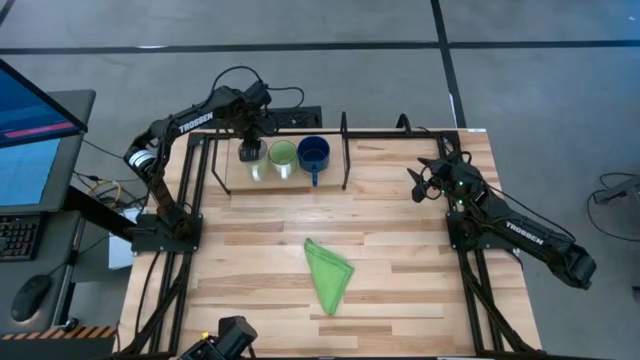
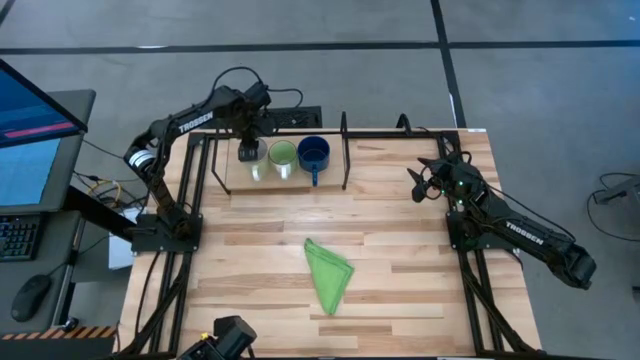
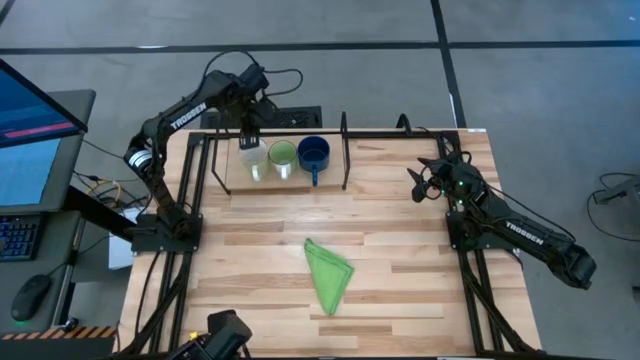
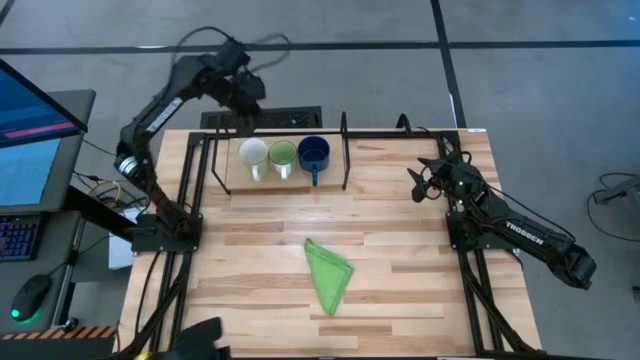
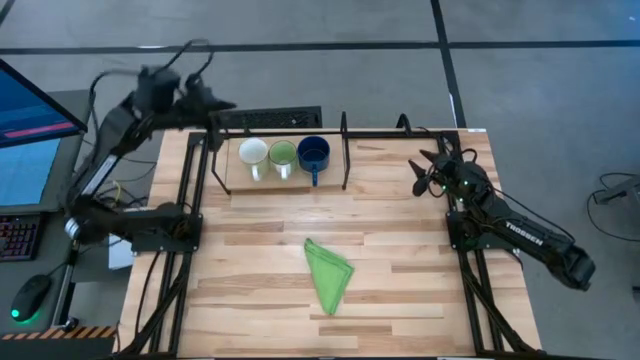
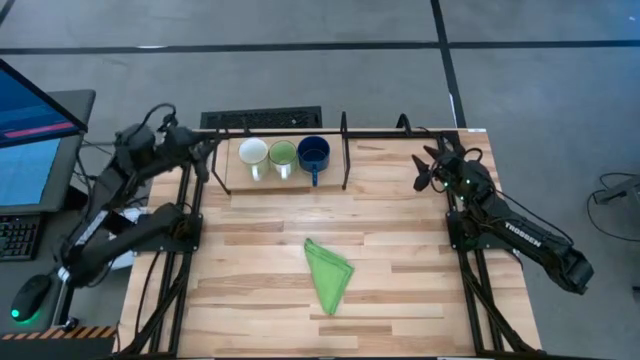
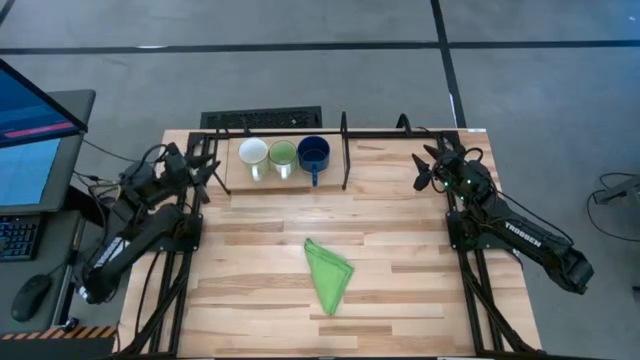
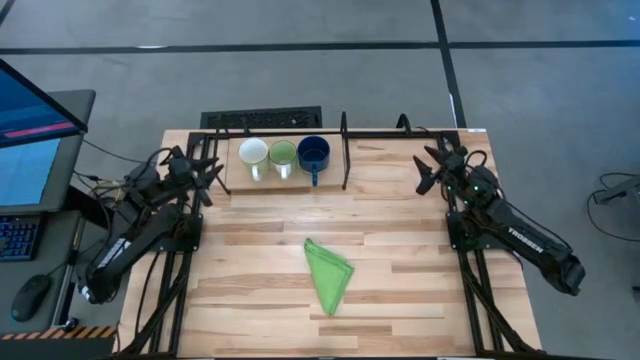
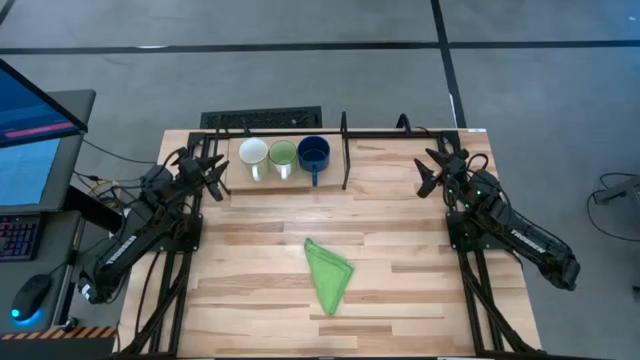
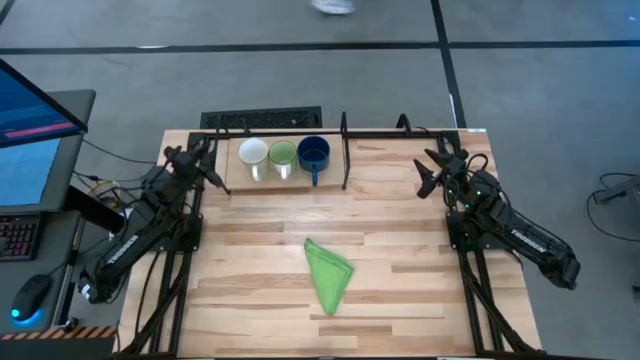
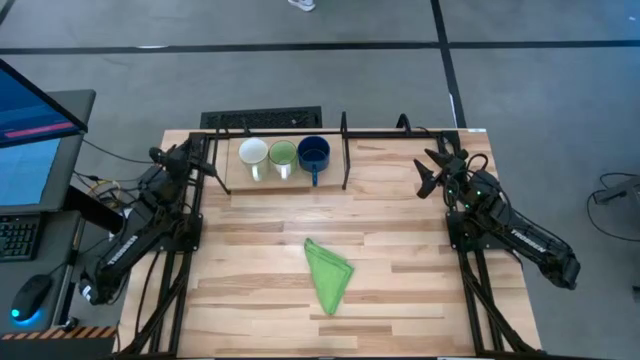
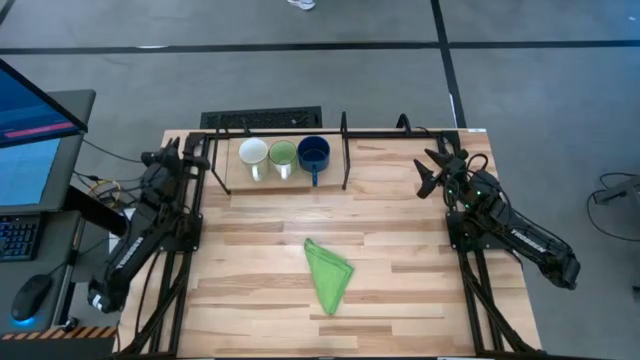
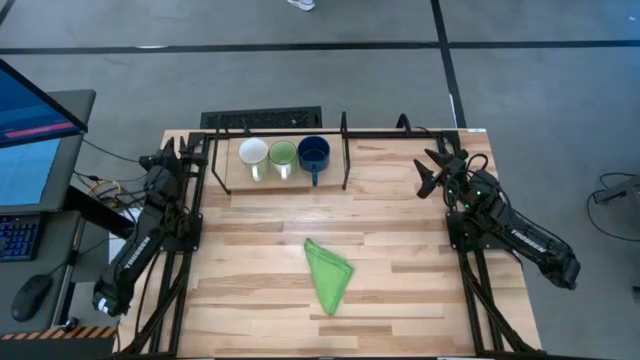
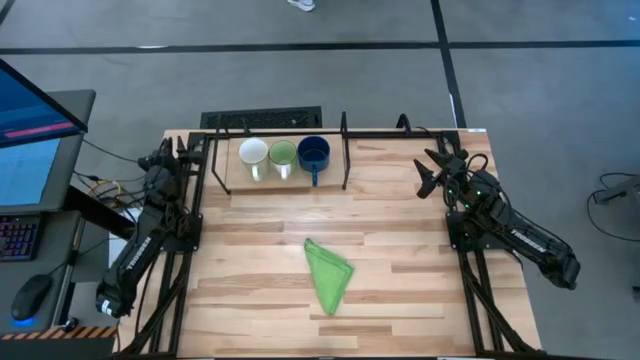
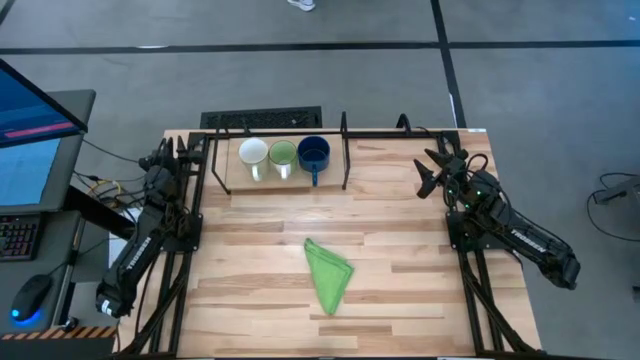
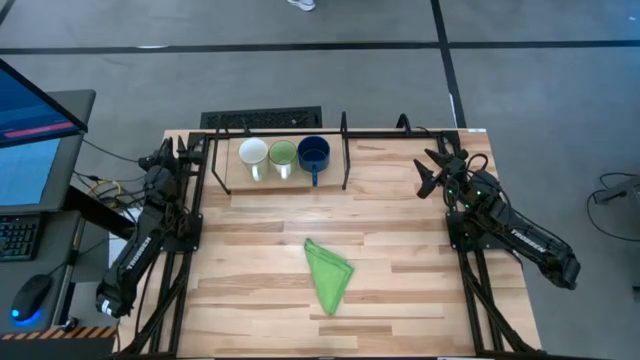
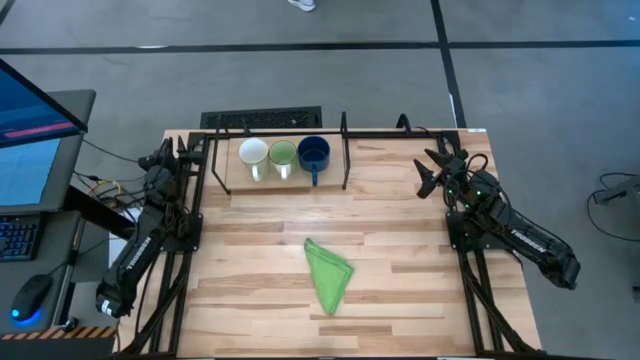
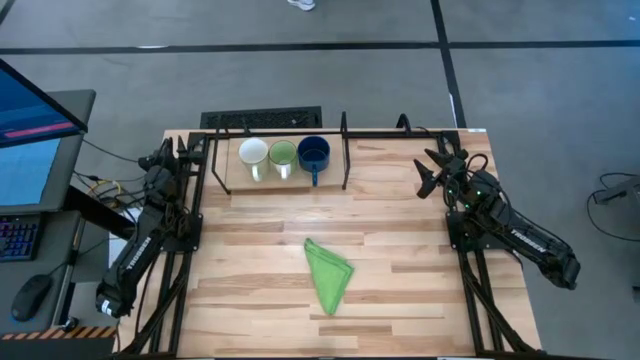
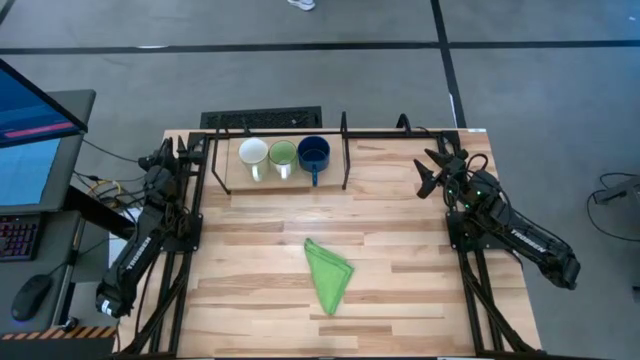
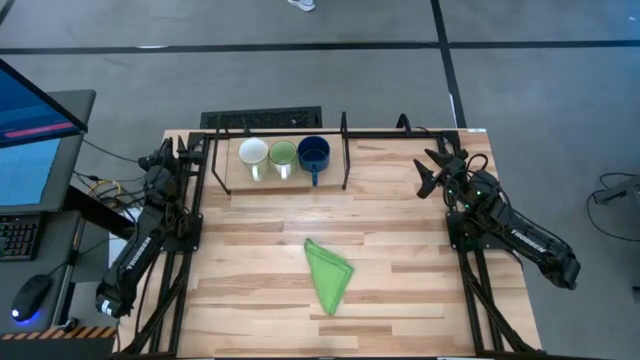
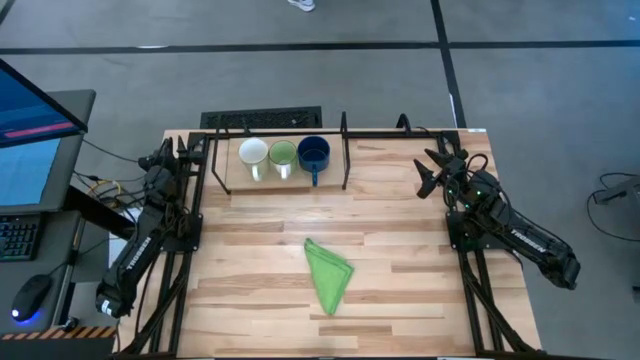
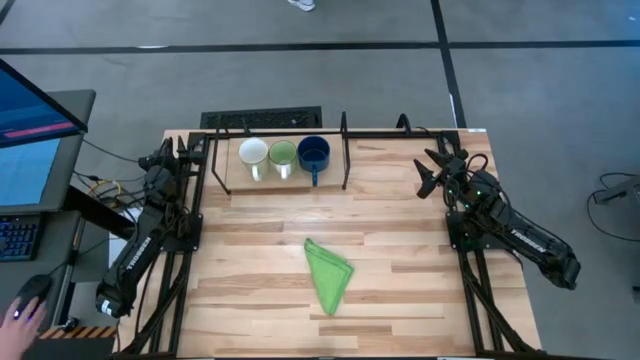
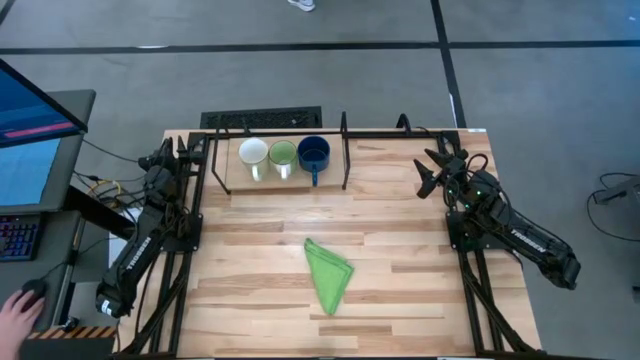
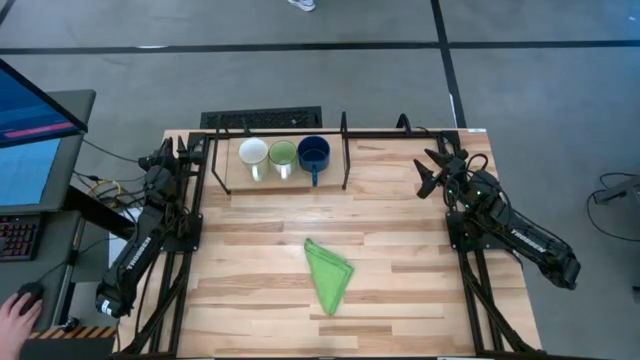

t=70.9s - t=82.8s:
Task: Stack small to large cups/mugs on shelf
Return to Home Position

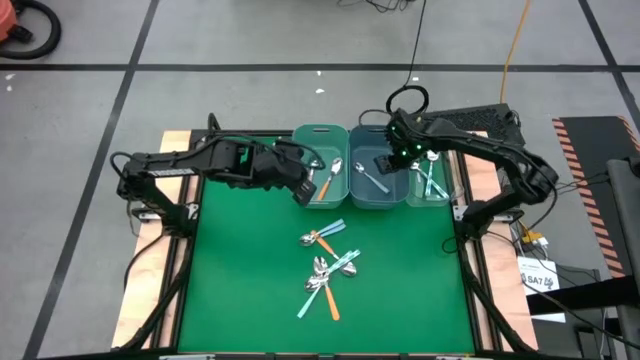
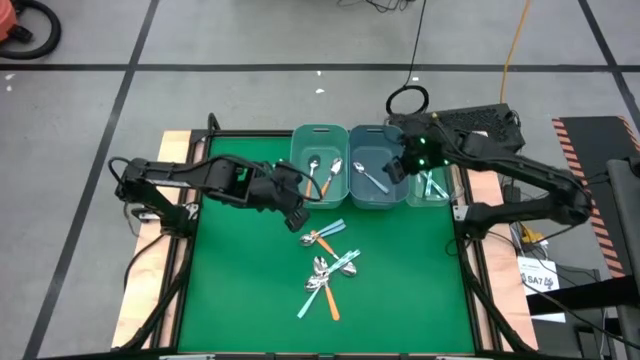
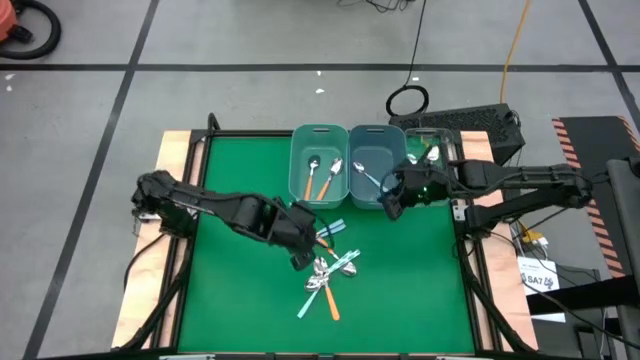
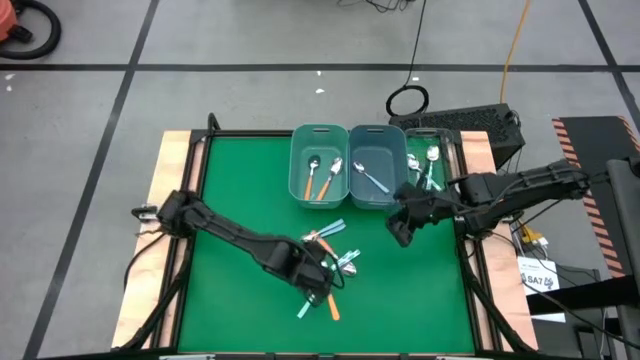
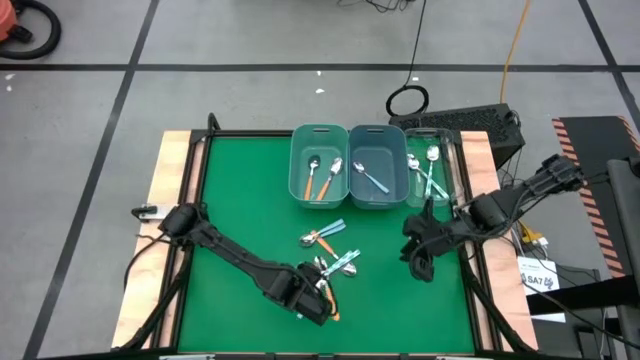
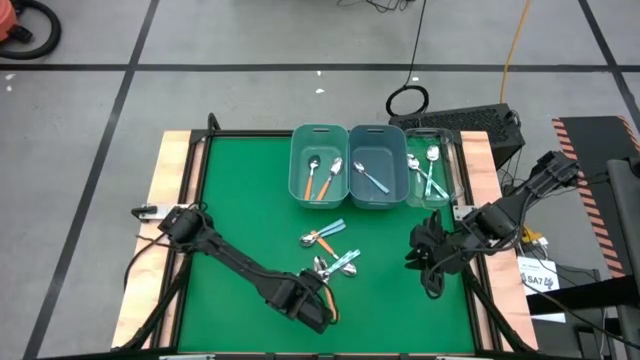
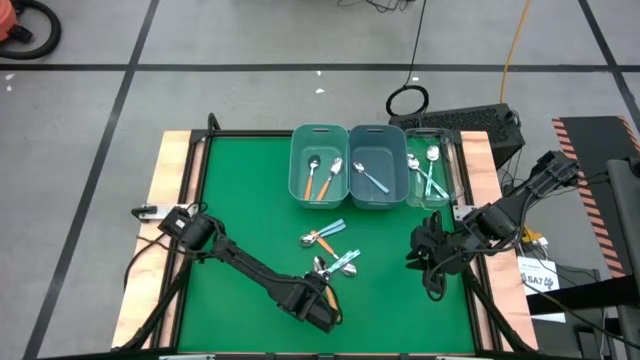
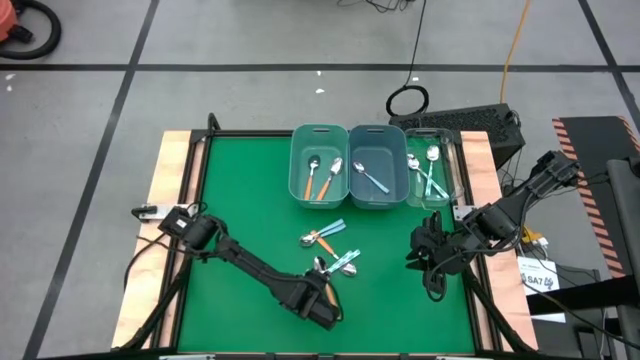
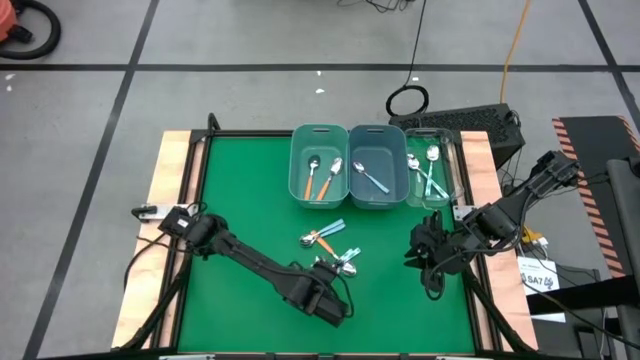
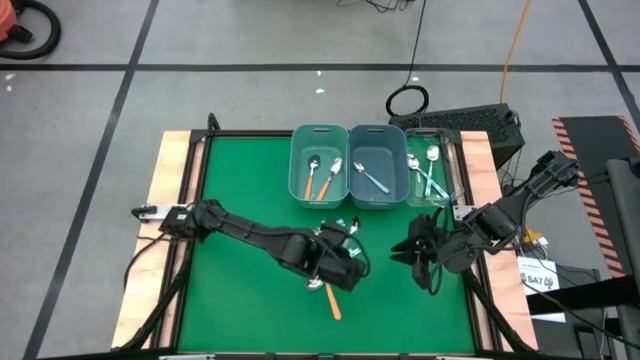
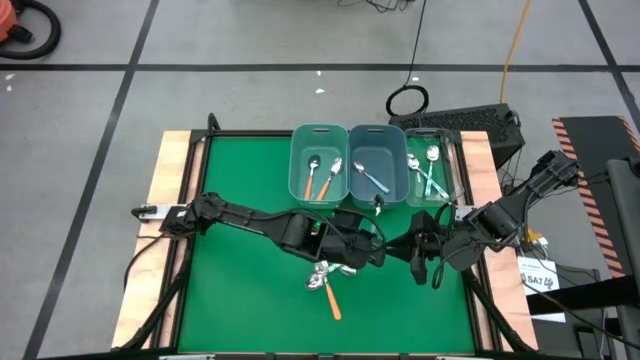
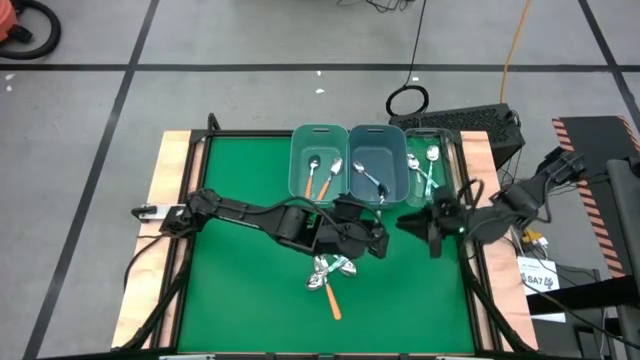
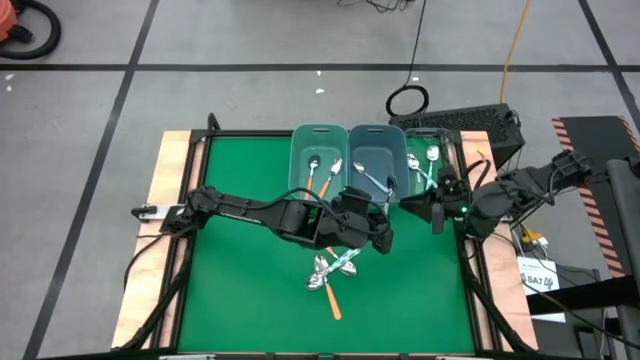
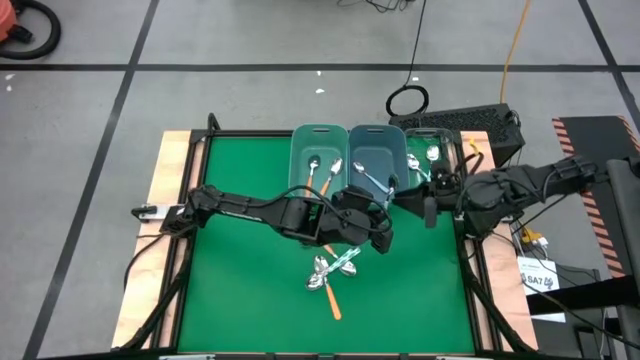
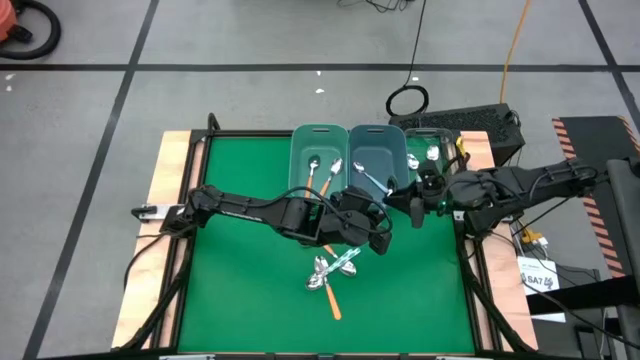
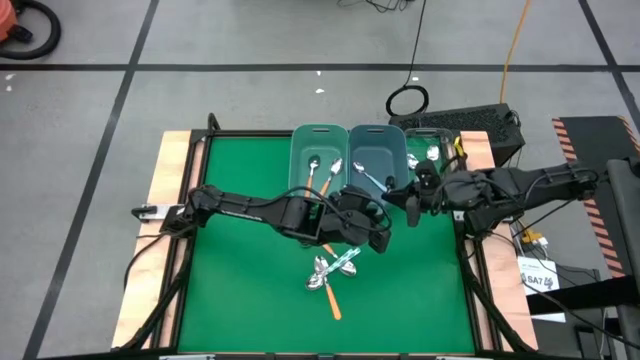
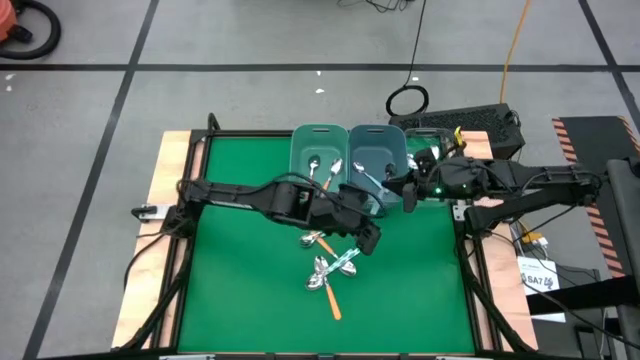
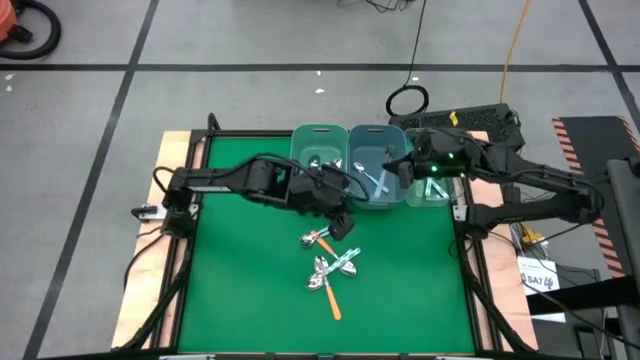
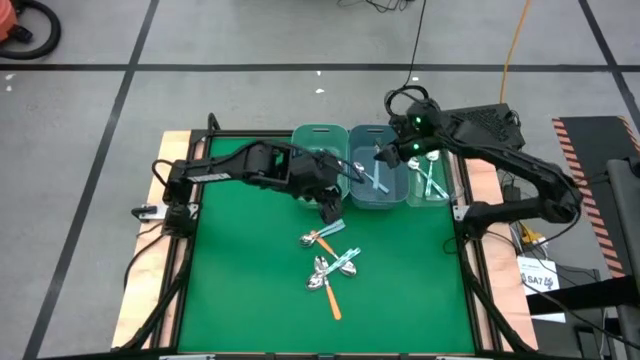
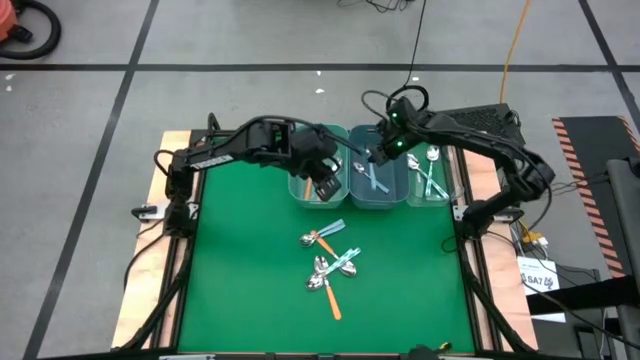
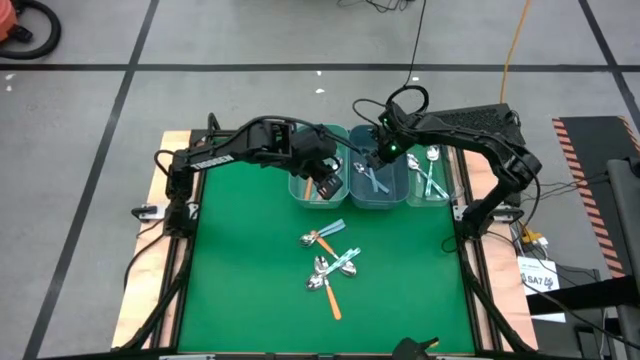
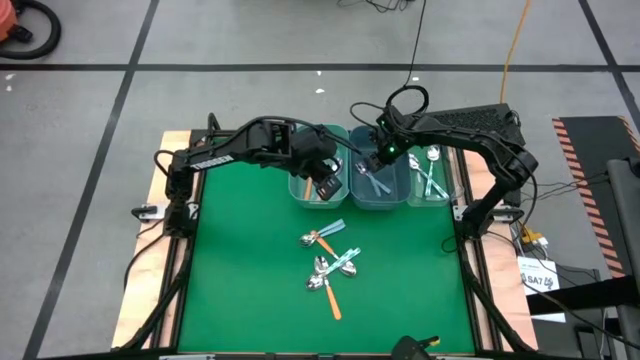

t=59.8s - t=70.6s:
Task: Sort silverware by color (type)
Put the blue spoon into the blue bin
